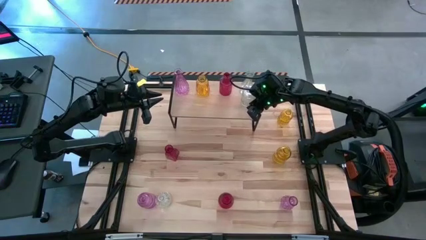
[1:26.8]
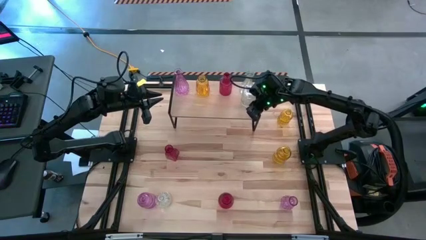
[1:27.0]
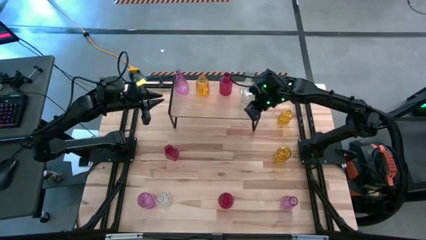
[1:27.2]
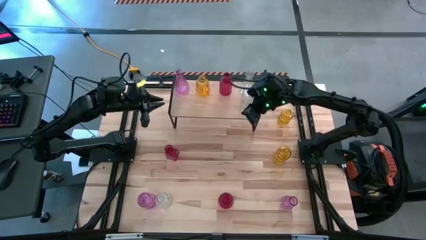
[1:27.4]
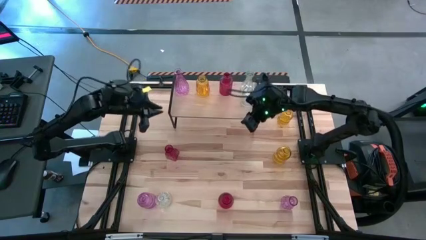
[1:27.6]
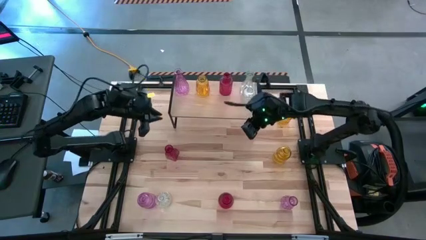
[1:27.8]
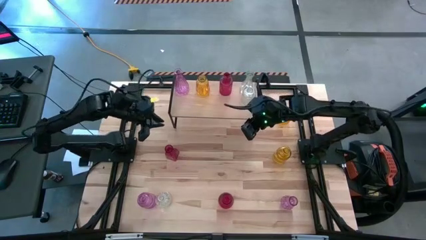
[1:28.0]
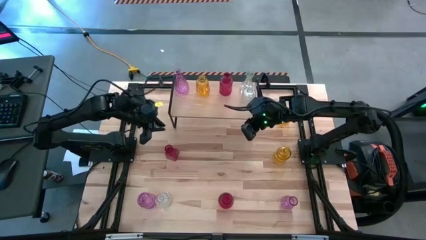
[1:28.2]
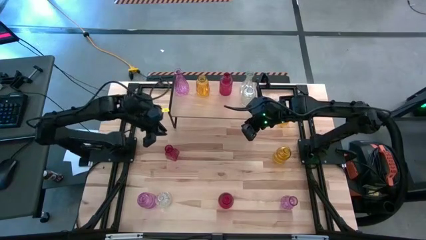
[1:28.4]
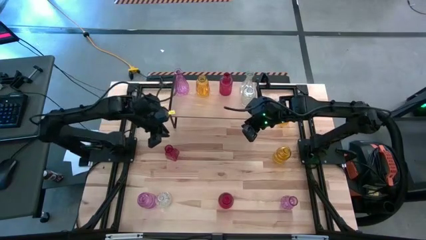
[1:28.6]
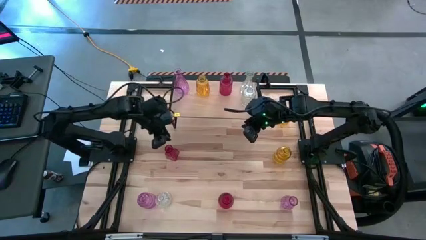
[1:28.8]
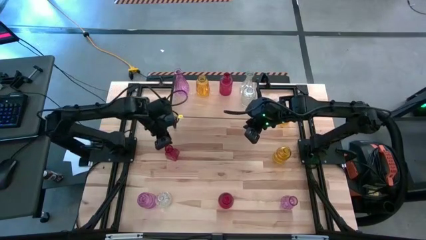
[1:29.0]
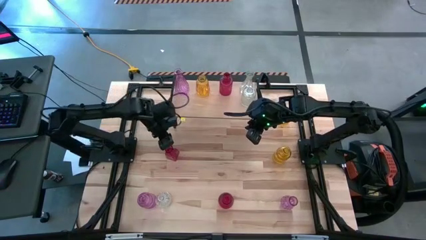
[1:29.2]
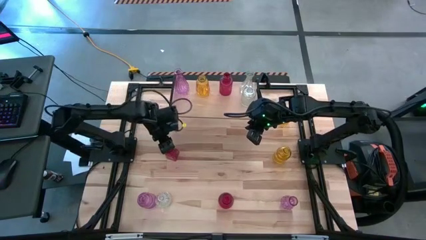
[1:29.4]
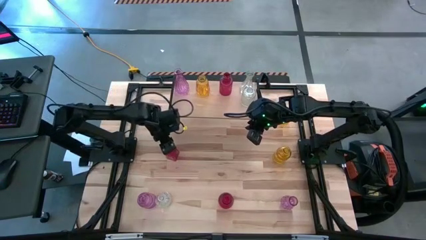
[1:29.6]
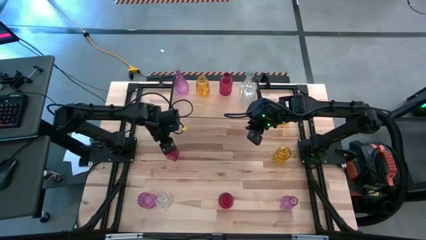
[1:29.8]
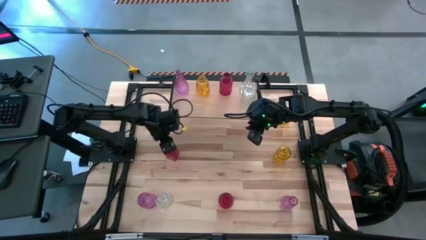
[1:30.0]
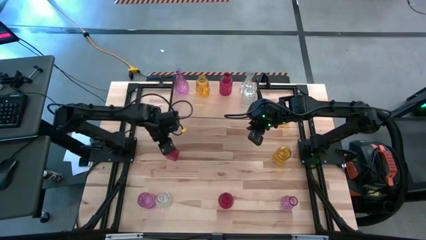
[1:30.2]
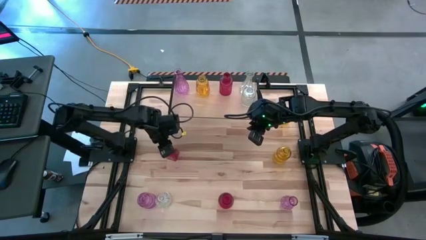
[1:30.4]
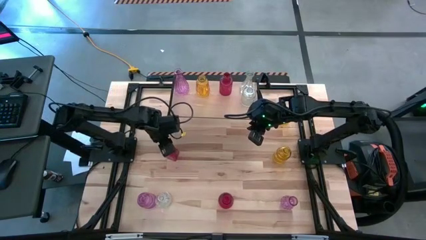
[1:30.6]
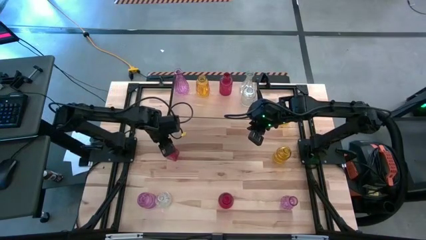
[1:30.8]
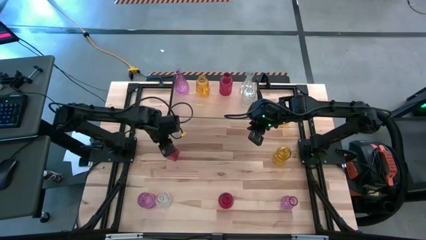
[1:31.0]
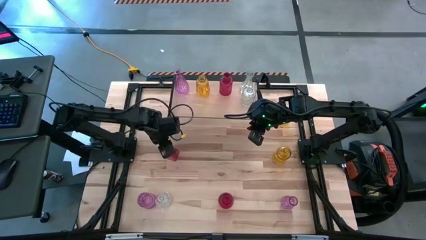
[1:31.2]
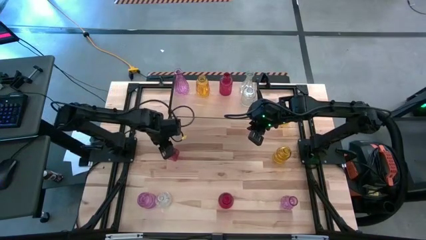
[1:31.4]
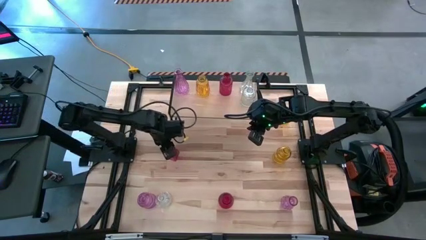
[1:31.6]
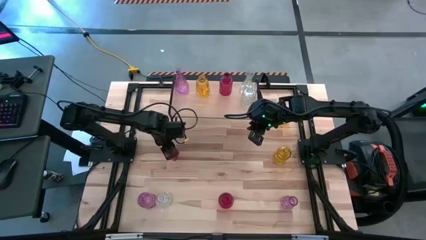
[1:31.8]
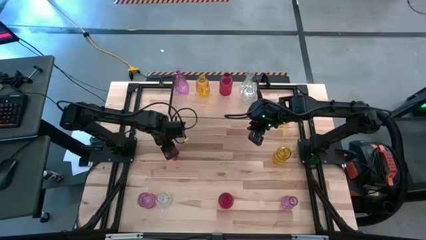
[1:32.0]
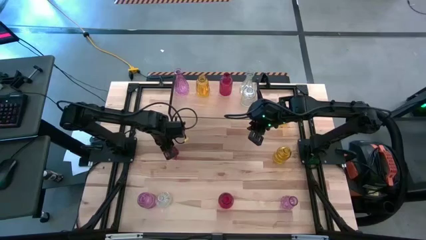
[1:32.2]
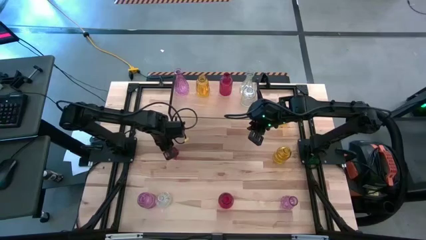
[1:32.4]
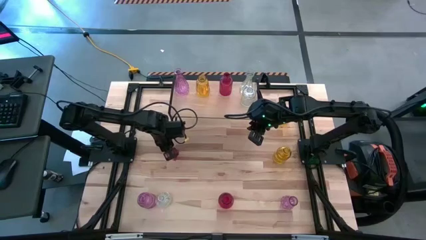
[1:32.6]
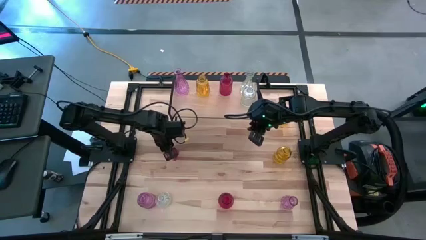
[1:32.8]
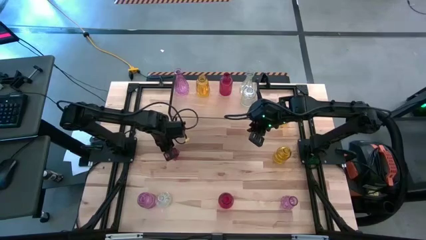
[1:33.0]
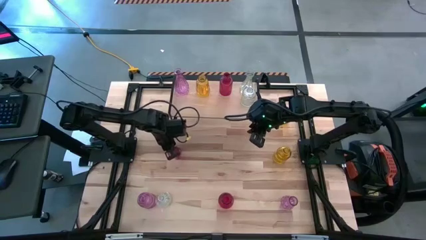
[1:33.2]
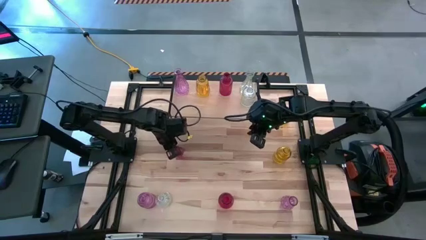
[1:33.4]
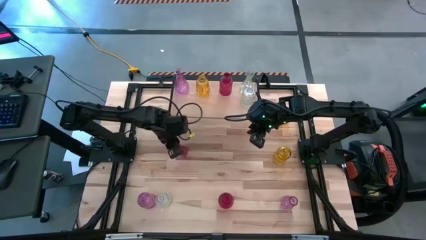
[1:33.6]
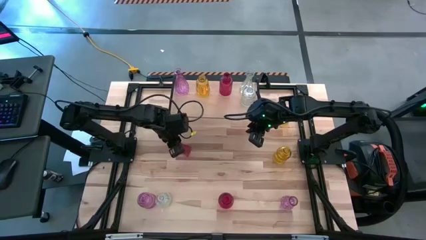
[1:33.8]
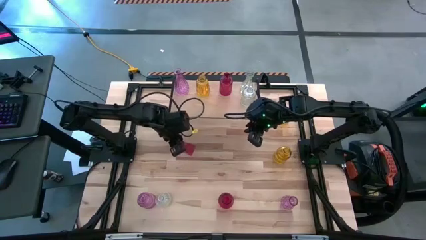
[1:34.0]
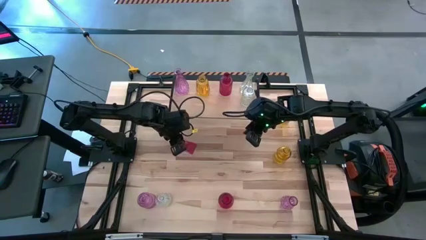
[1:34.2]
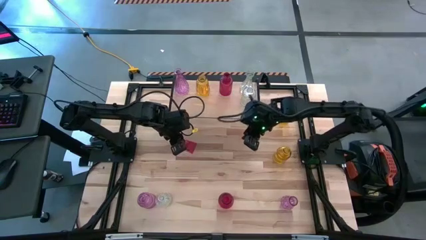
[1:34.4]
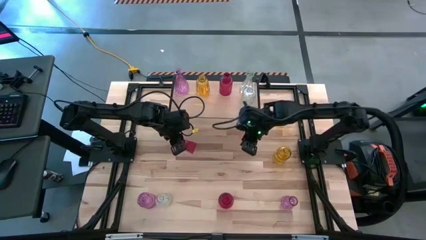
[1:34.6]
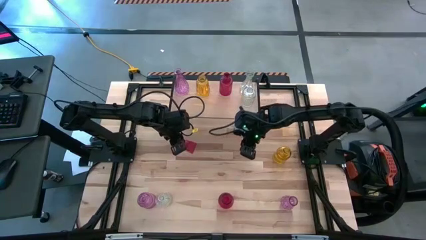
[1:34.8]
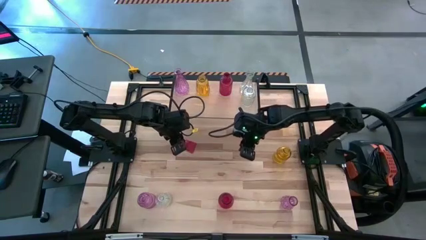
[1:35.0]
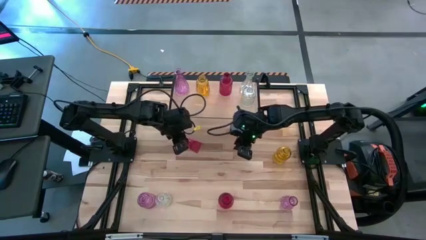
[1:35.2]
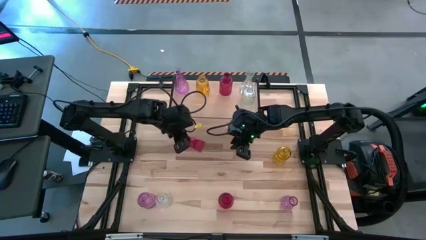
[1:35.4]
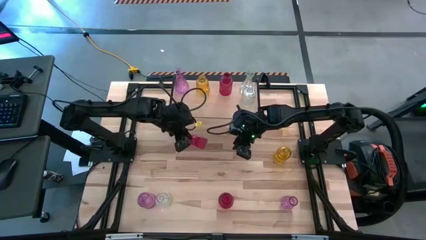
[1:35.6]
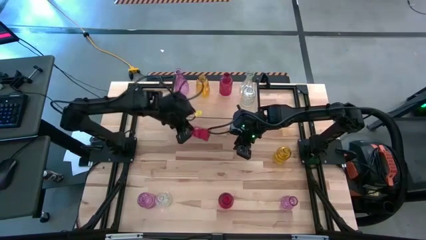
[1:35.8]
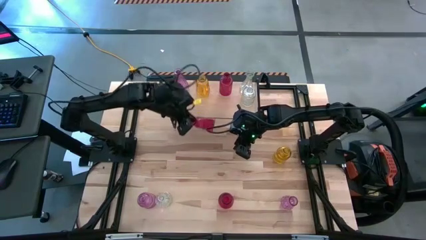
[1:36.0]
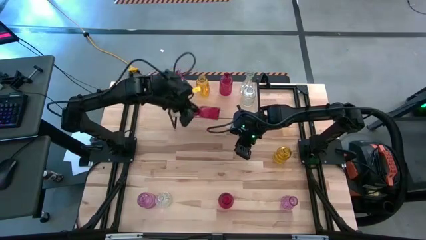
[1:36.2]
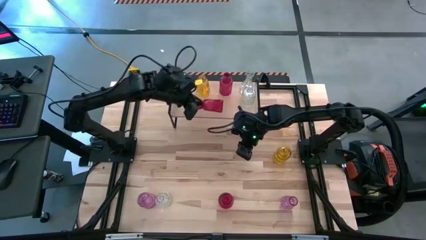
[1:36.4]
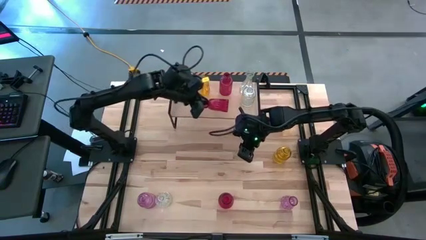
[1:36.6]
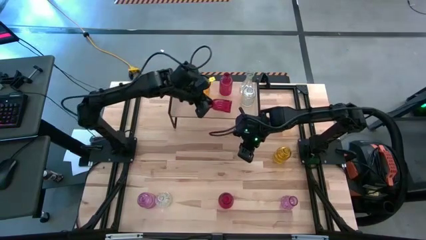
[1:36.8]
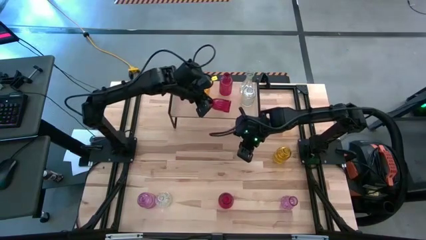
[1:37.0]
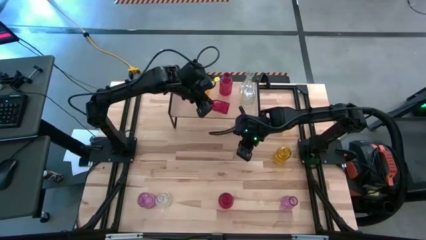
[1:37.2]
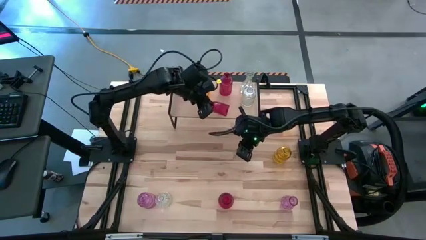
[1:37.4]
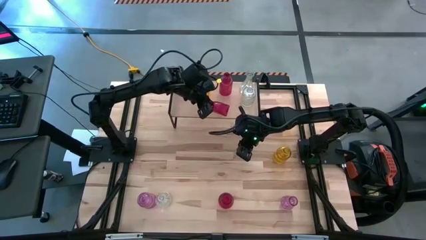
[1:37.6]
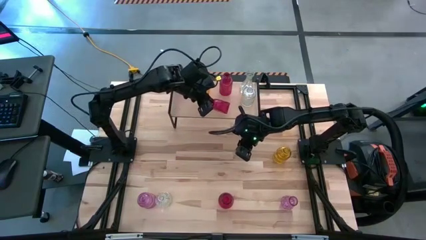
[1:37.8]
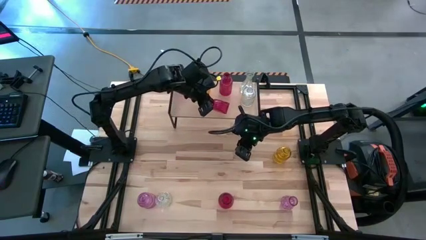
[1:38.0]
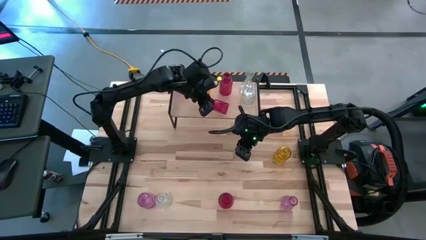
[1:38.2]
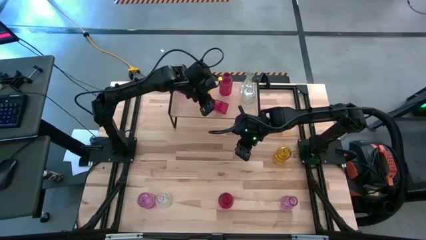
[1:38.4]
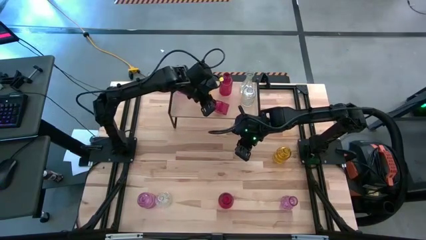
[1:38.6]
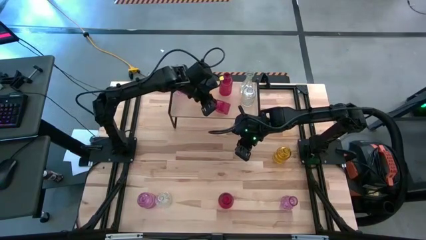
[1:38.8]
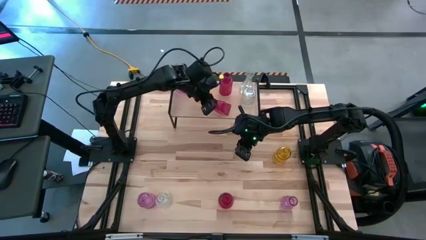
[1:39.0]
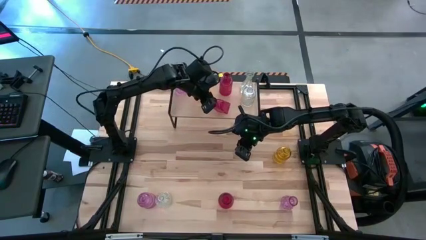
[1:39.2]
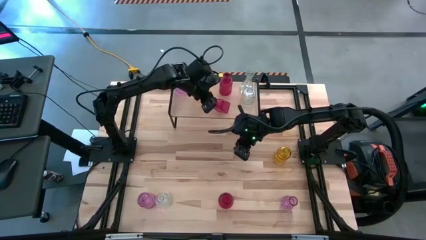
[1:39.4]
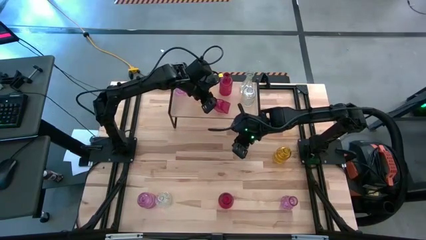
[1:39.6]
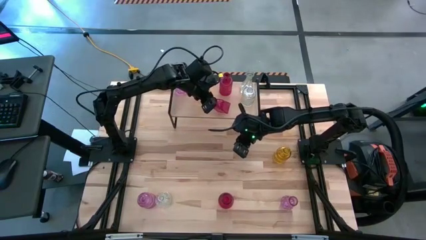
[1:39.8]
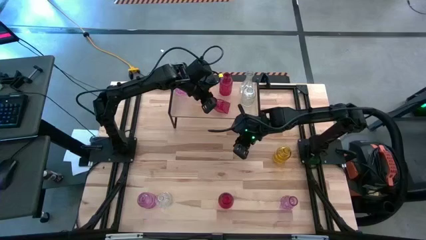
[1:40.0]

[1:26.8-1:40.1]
Task: sort vases onto shelf
Put the top red vase on the shelf and align it with the other red vase

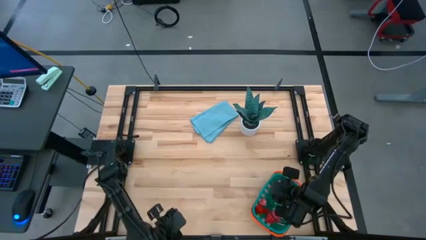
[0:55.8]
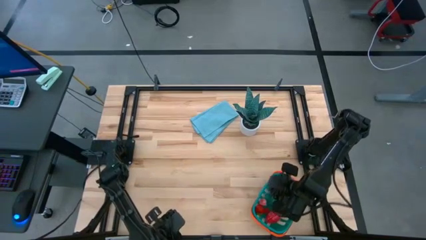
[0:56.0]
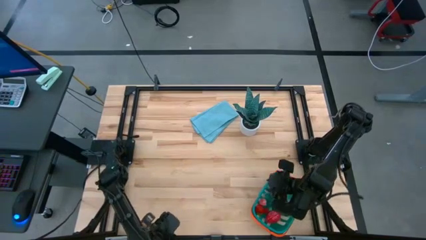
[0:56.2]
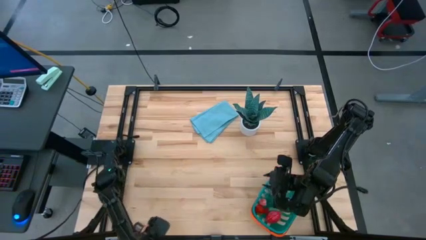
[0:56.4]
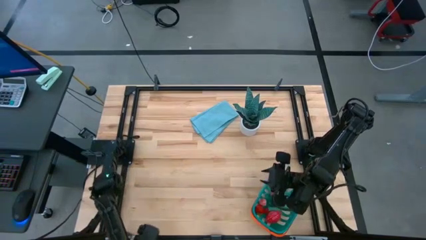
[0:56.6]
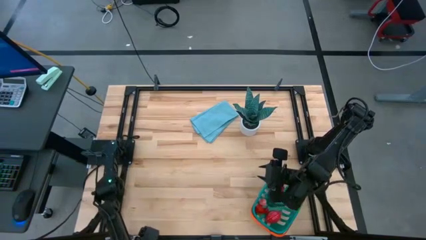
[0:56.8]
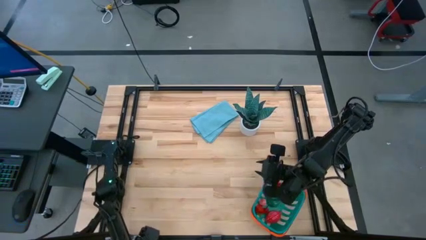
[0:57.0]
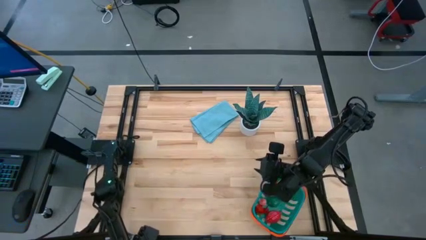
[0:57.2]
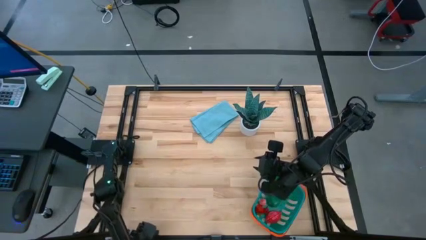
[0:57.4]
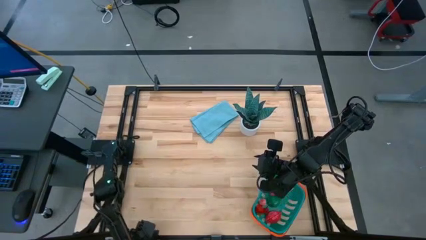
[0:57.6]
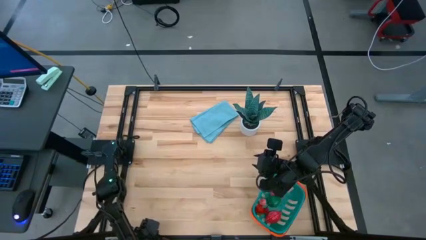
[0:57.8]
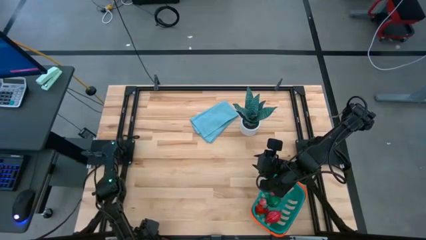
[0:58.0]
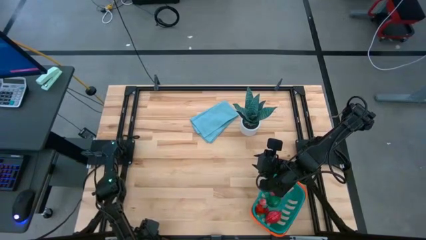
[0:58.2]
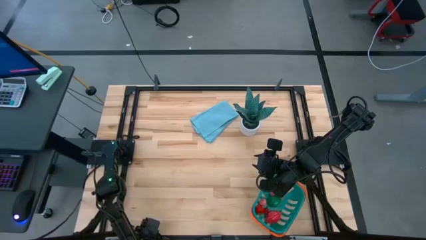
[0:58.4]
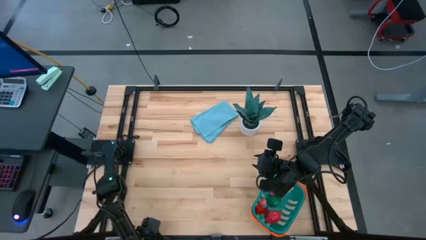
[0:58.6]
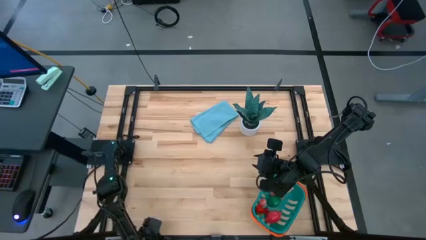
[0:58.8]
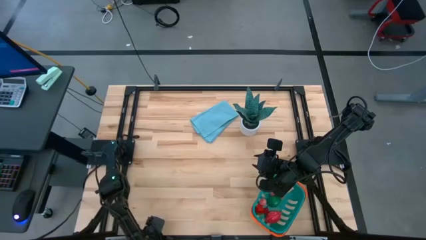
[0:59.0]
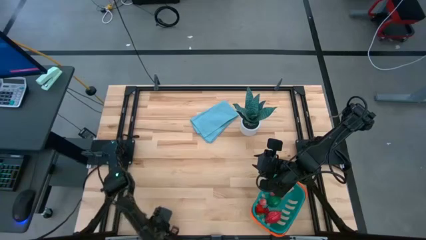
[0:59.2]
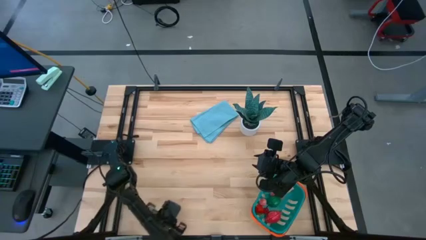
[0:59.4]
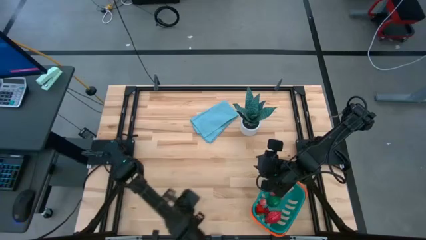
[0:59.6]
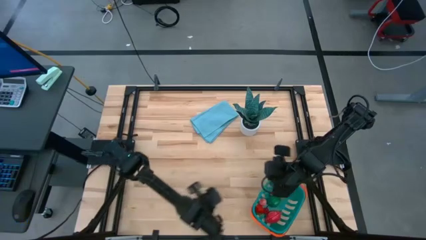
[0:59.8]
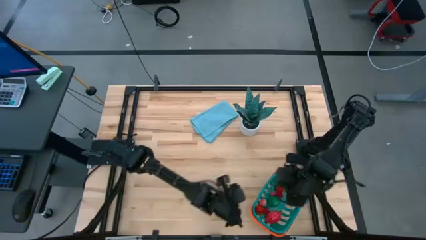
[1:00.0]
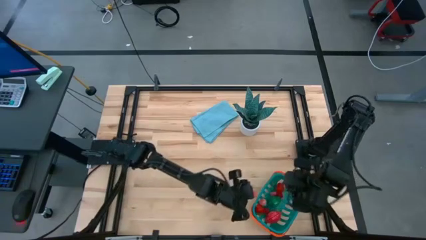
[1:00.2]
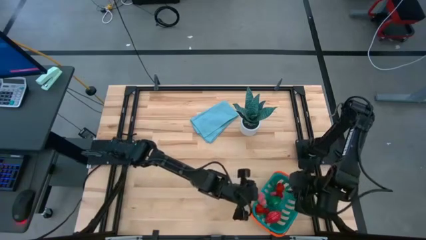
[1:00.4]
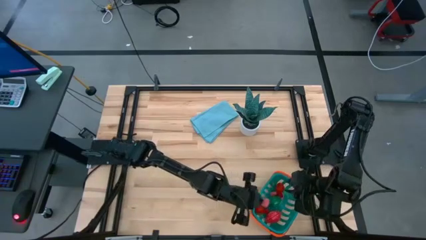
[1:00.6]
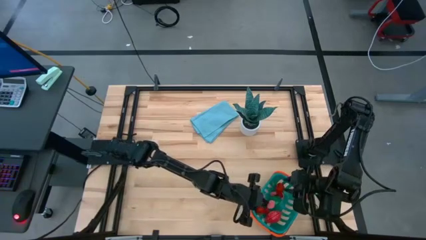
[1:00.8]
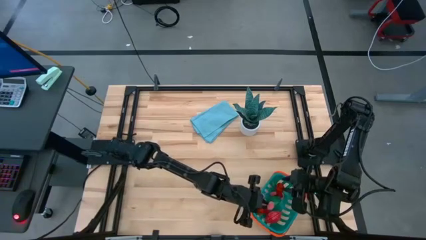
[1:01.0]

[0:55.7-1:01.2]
Task: Pick and placing Produce into tupperware
Put the apricot into the basket
